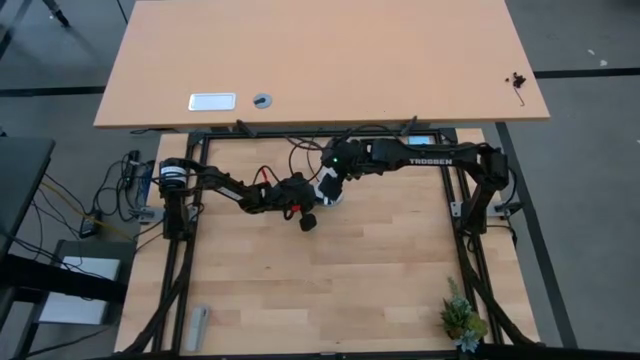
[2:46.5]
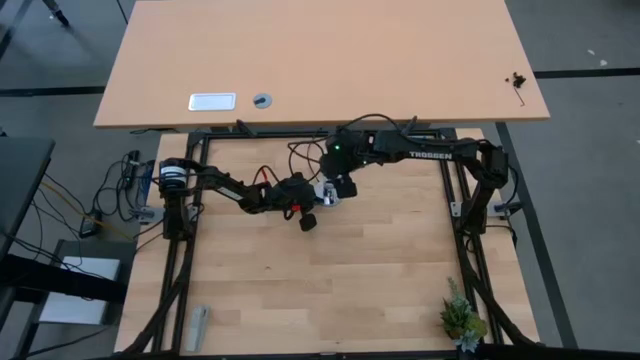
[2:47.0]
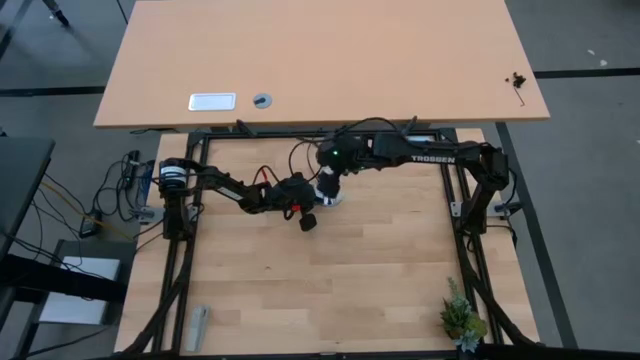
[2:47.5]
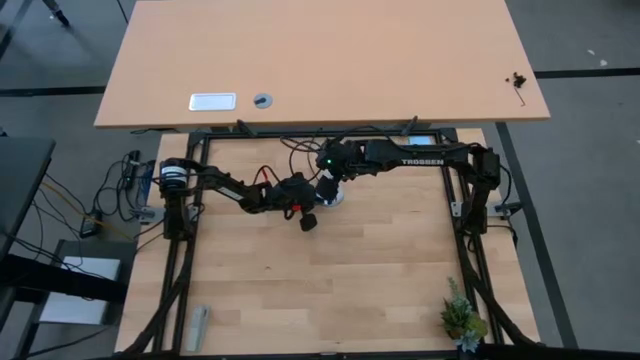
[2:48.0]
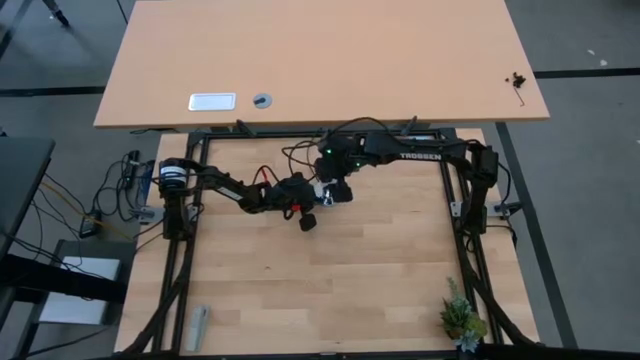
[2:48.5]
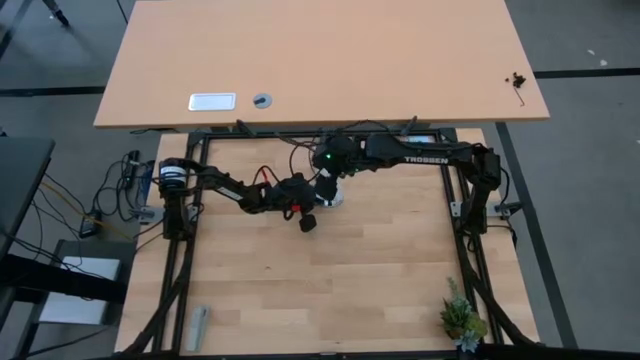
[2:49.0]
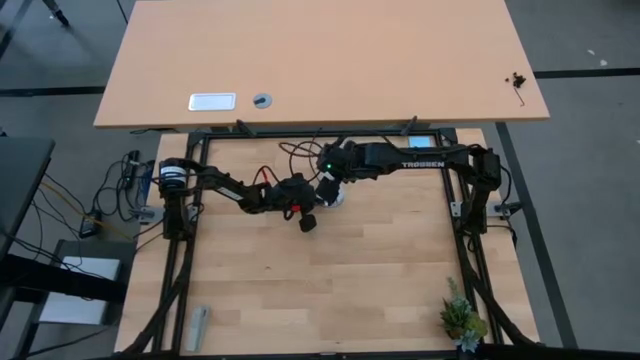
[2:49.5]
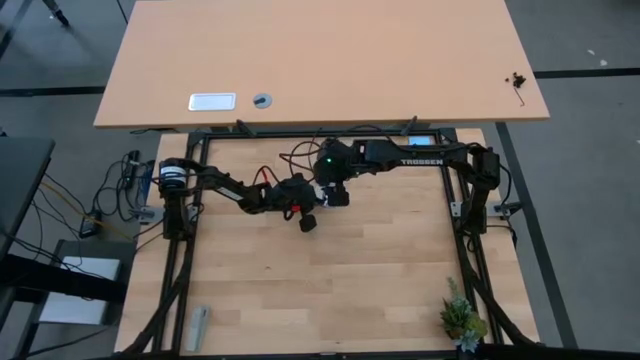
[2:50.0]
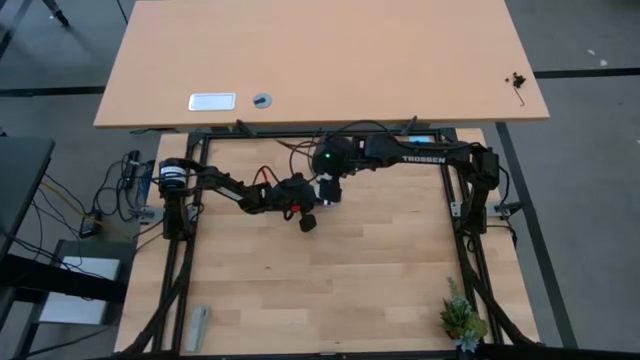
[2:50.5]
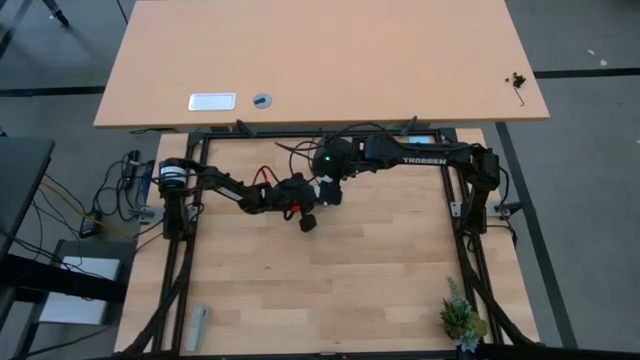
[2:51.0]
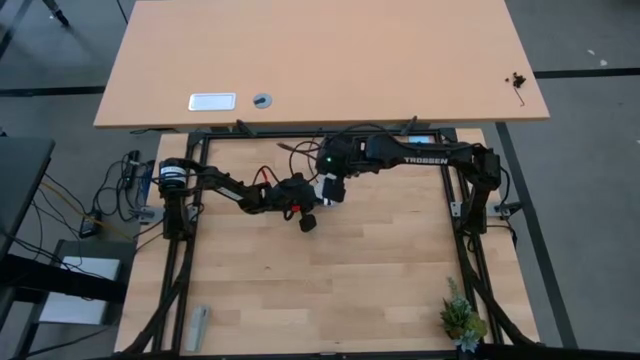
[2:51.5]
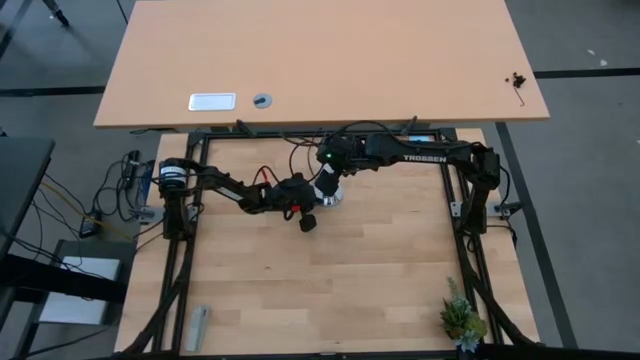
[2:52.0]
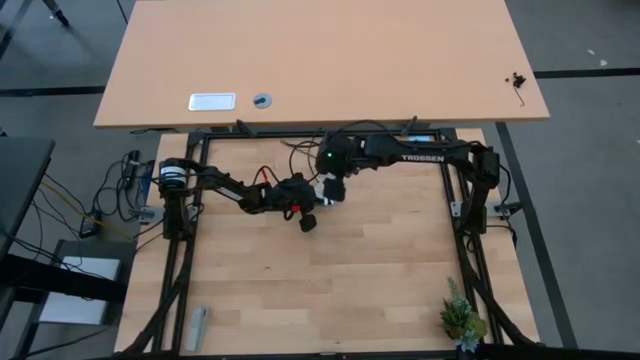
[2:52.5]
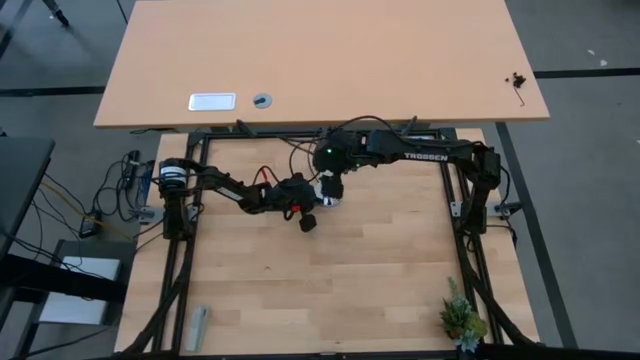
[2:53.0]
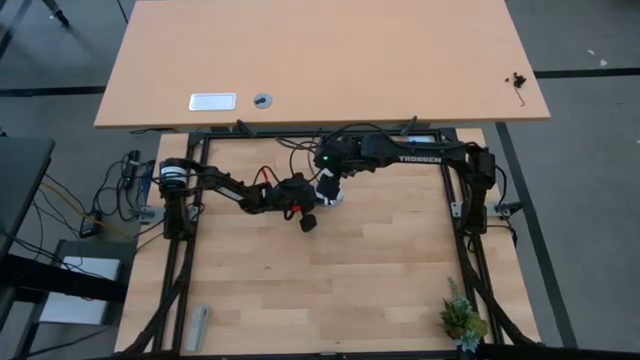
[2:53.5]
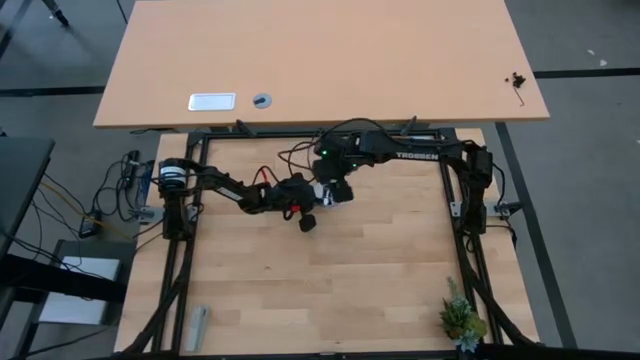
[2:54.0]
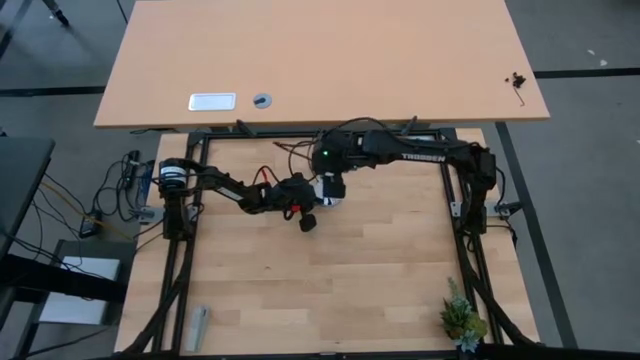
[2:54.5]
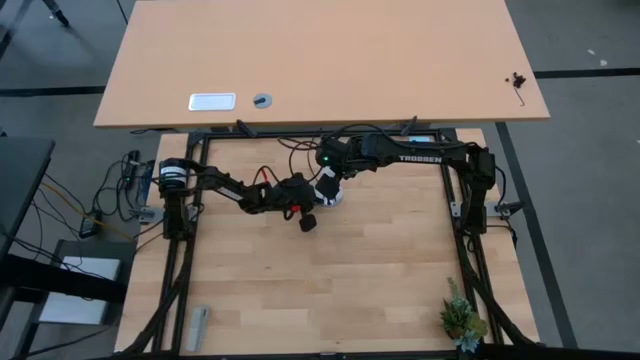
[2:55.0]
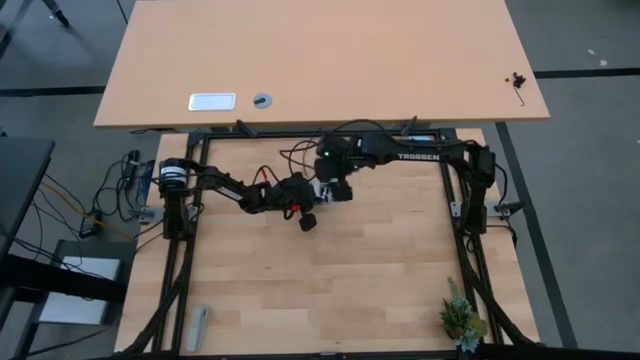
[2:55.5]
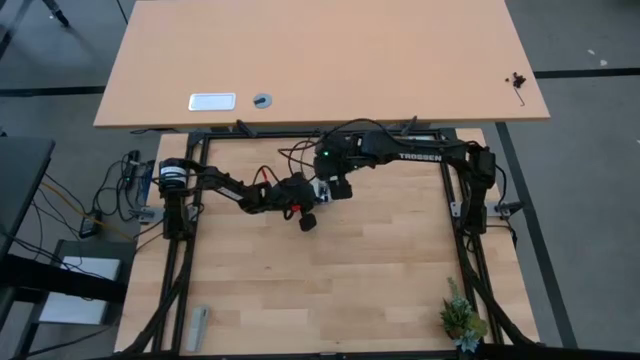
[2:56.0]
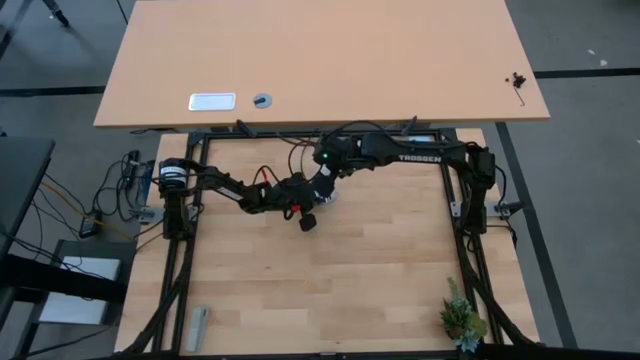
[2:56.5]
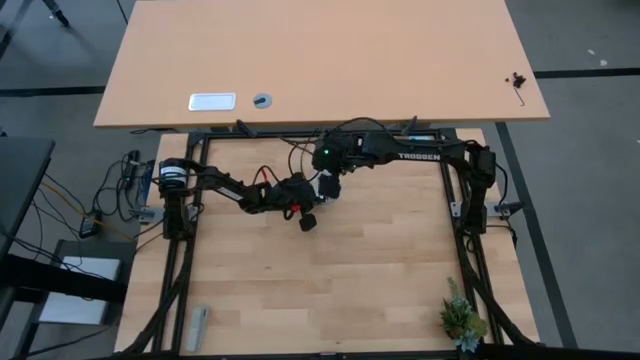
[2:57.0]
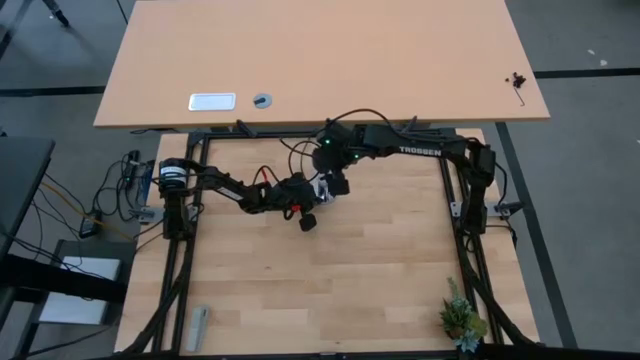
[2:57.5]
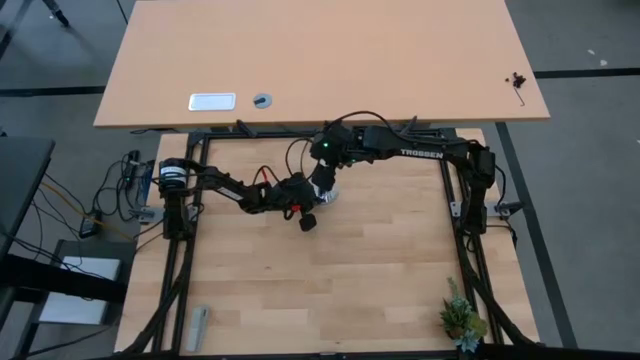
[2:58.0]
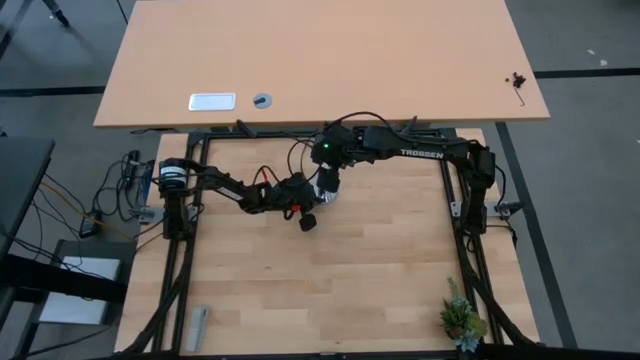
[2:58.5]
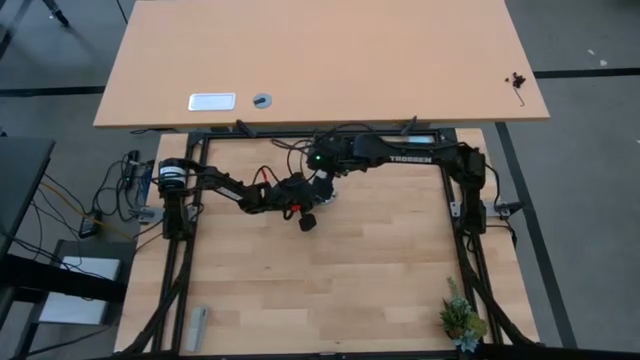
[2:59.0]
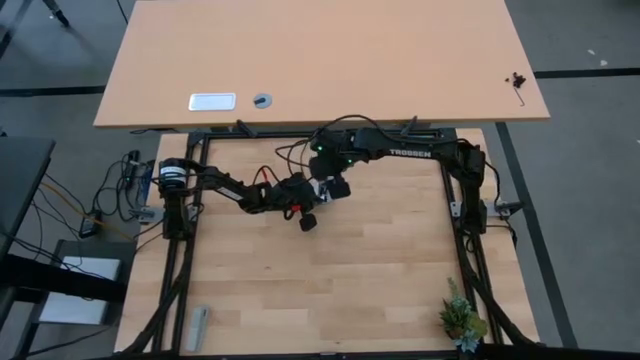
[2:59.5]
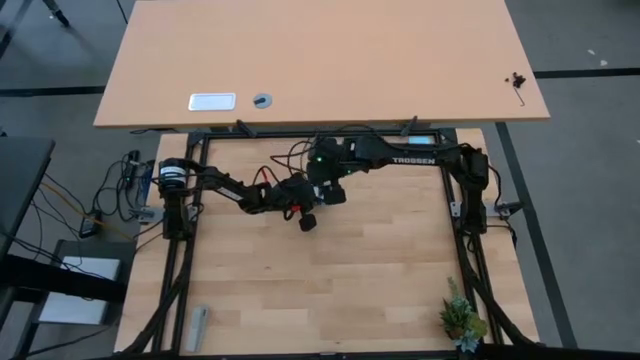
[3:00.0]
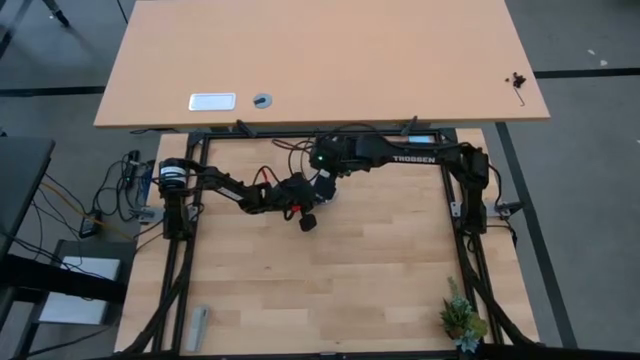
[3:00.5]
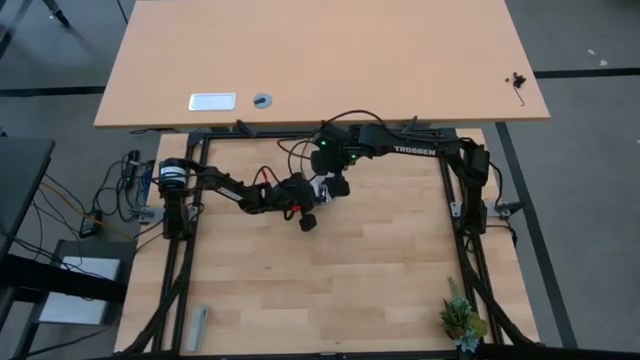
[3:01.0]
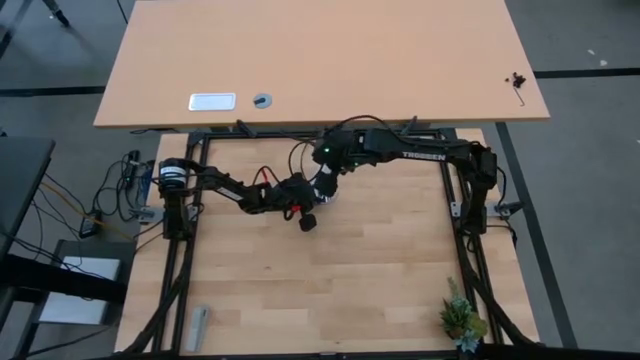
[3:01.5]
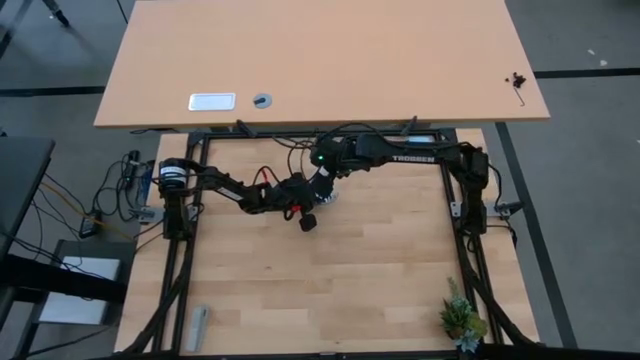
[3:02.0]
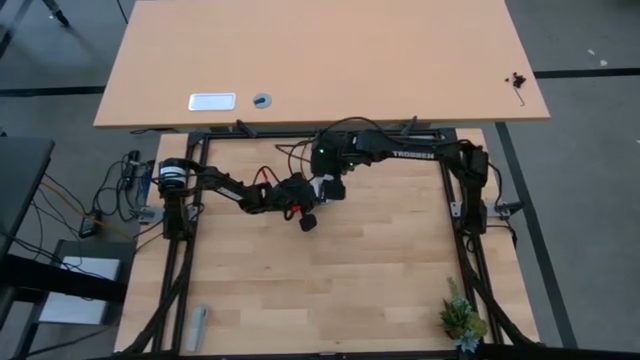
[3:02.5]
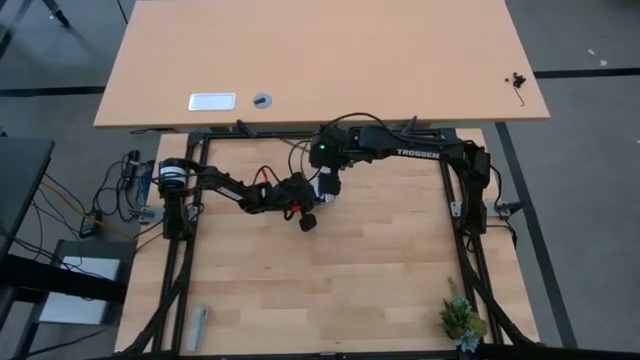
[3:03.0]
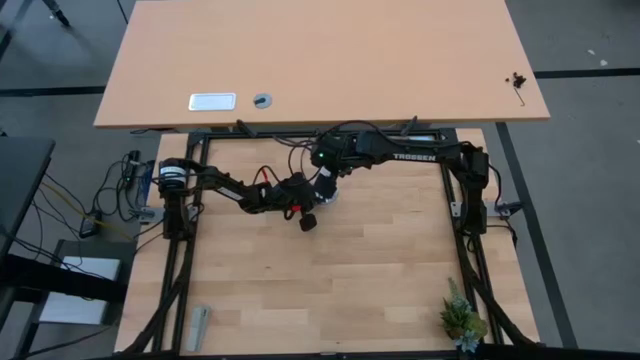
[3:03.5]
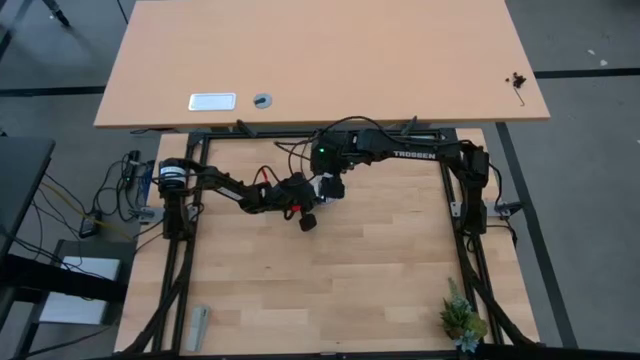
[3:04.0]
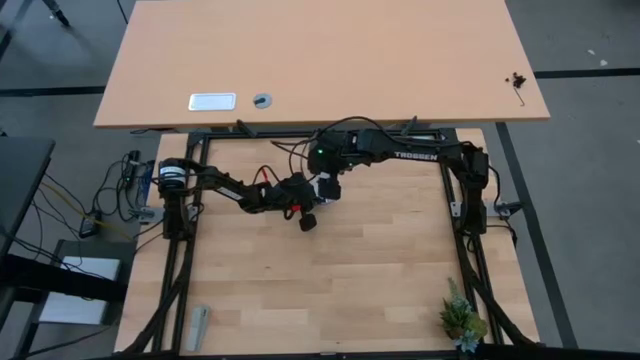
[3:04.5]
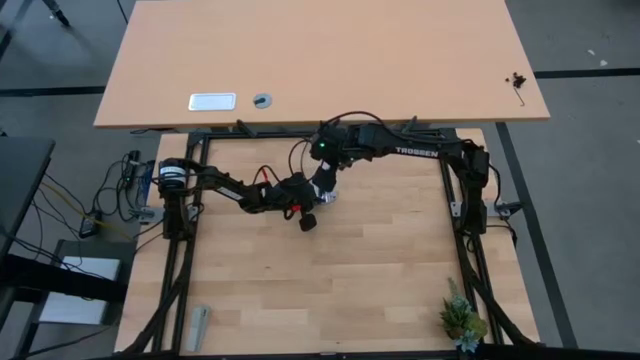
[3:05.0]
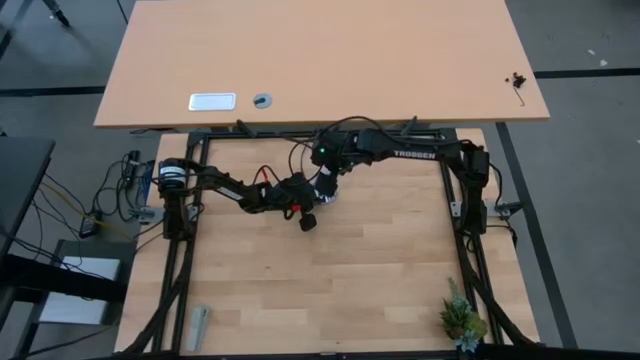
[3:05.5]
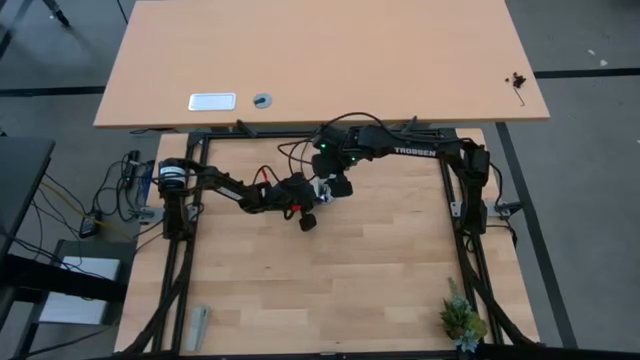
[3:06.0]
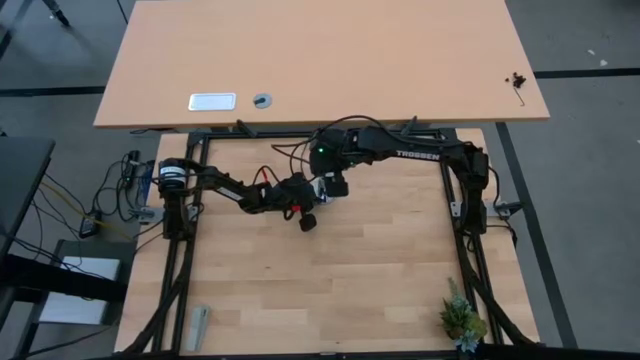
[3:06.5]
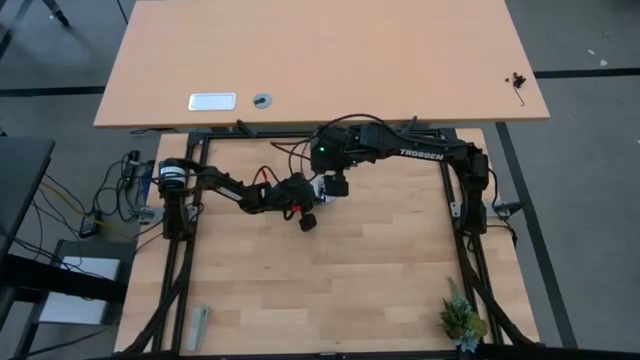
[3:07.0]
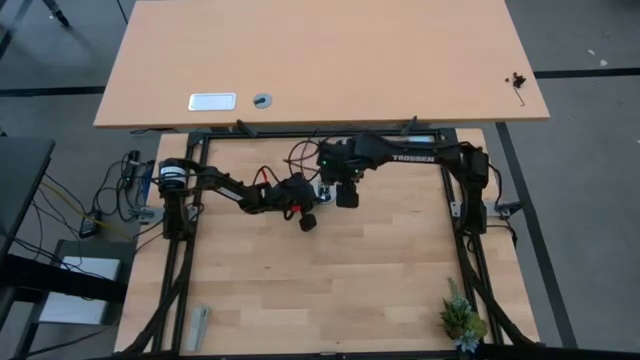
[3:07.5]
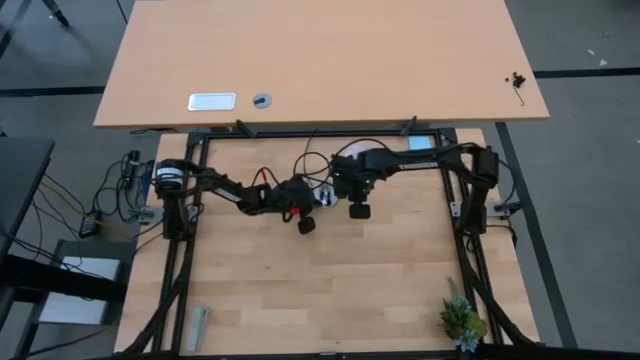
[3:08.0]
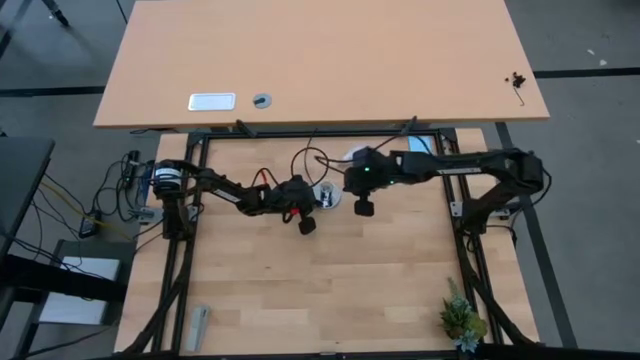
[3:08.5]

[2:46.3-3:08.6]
Task: Screw lightbulb
Remove the lightbulb from the lamp
